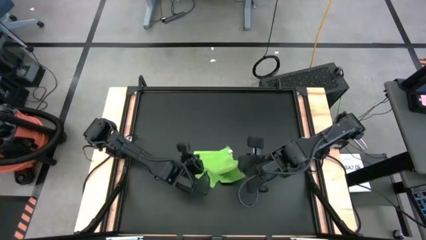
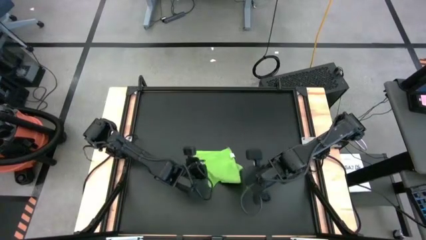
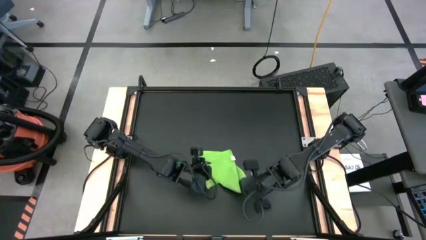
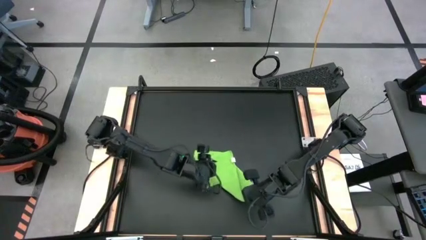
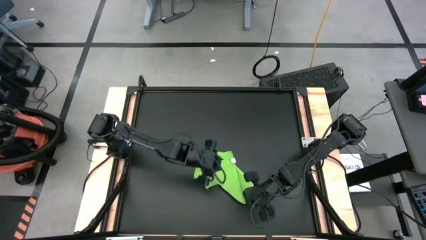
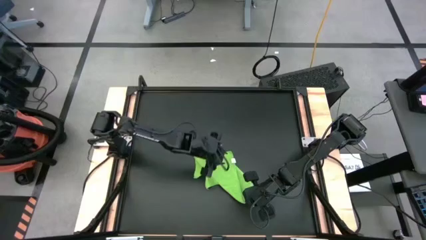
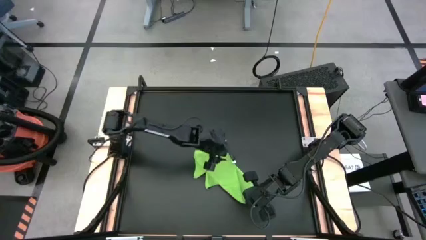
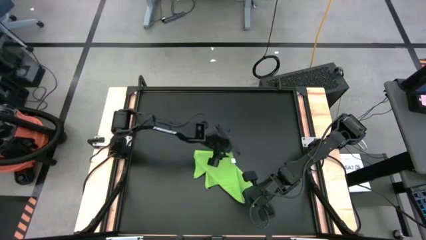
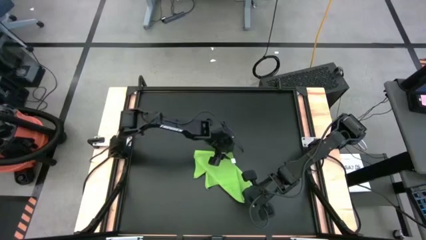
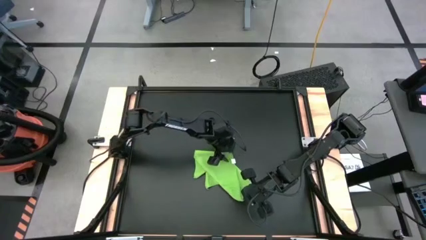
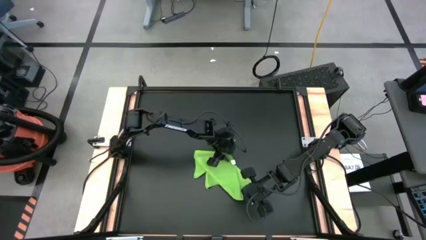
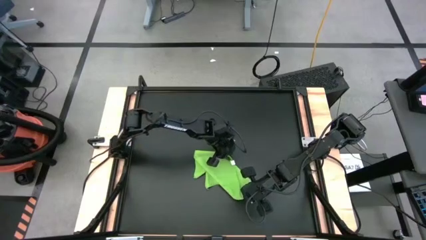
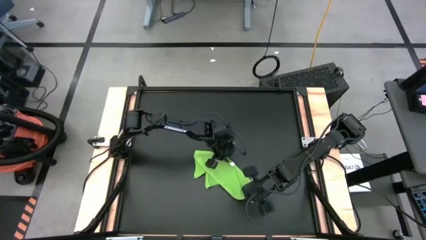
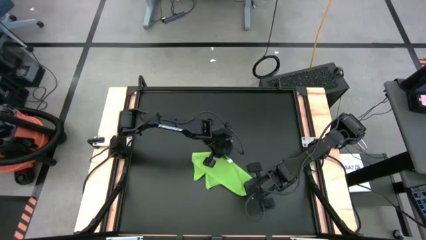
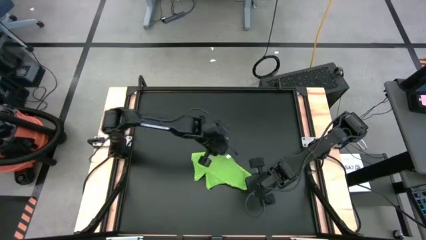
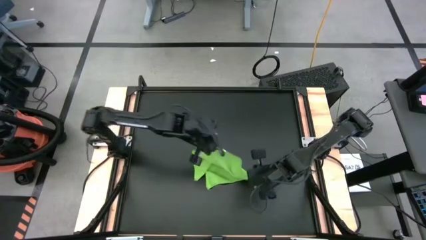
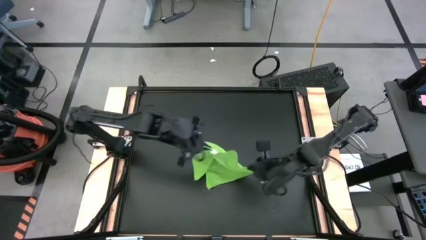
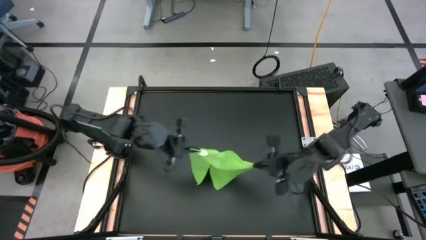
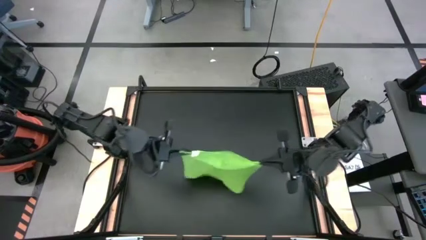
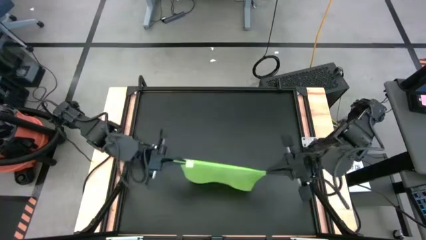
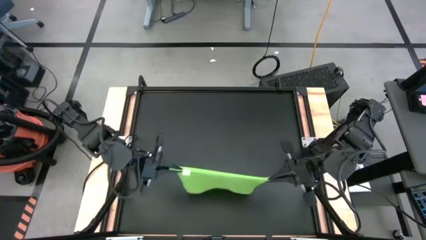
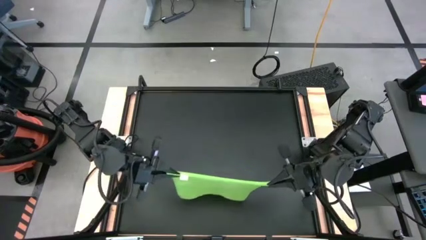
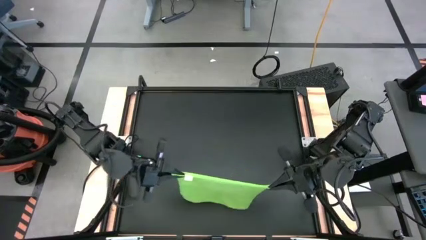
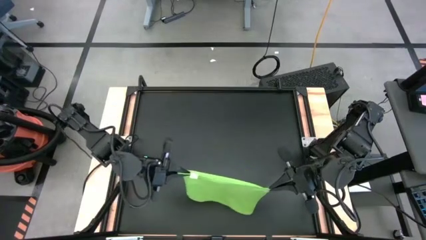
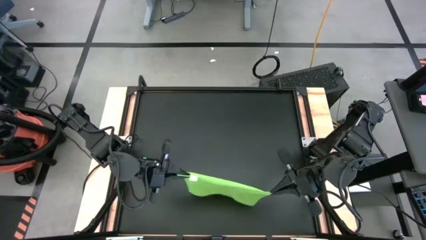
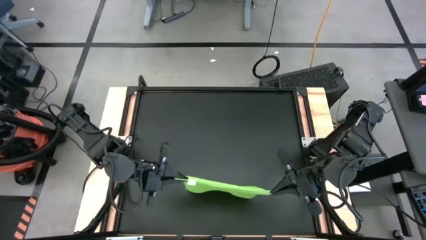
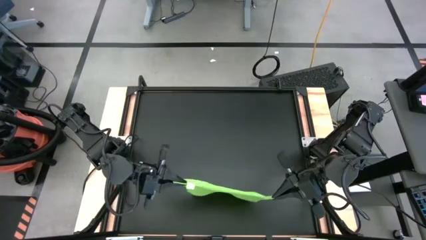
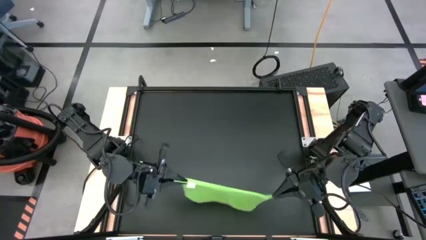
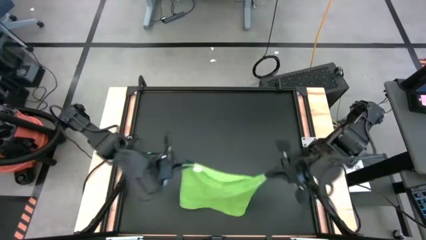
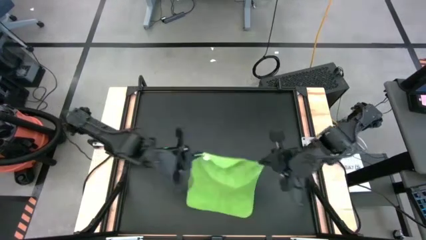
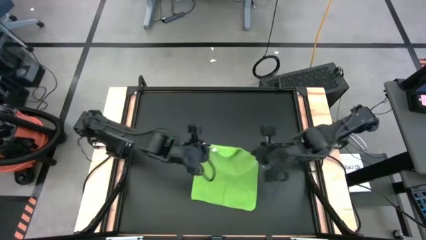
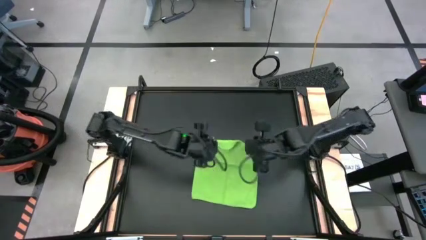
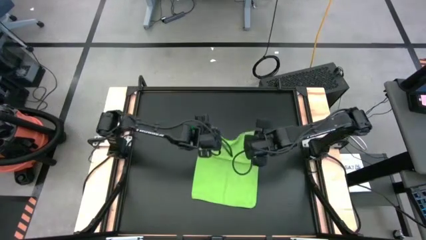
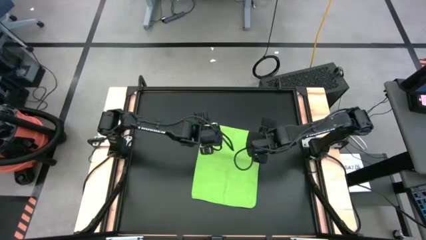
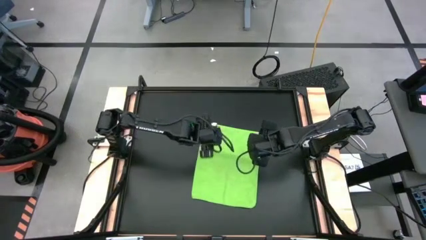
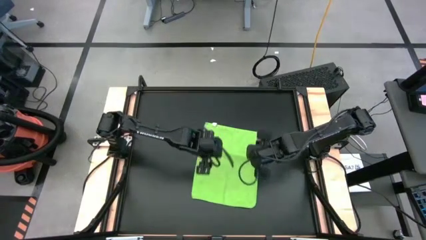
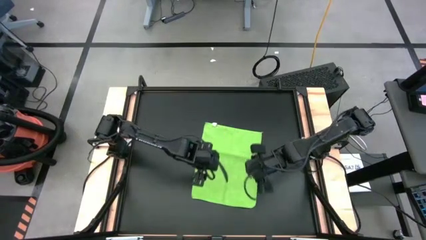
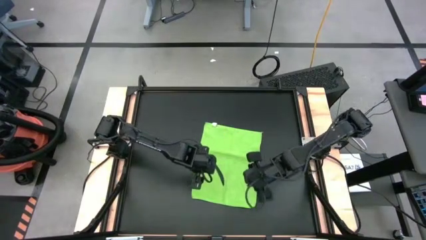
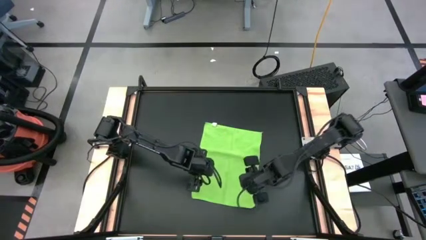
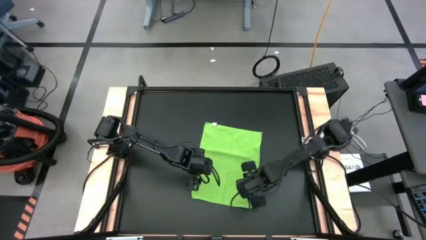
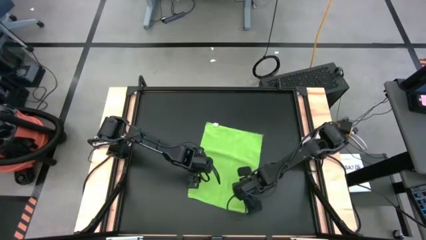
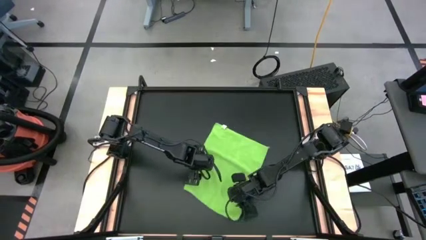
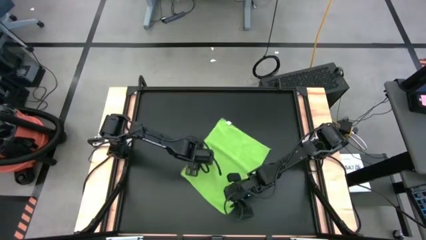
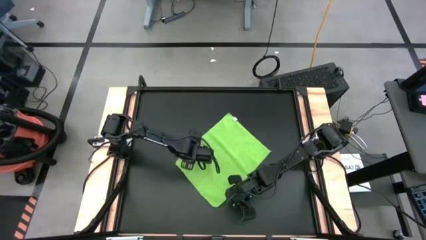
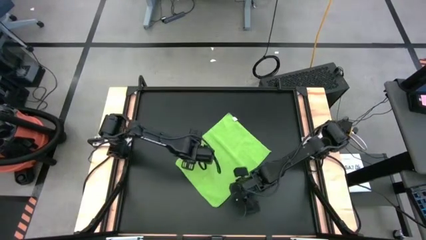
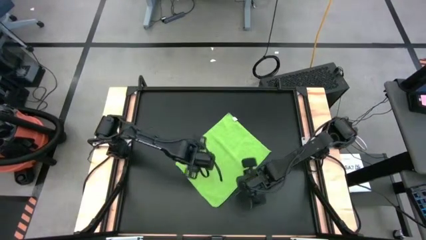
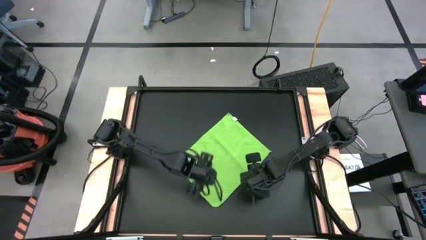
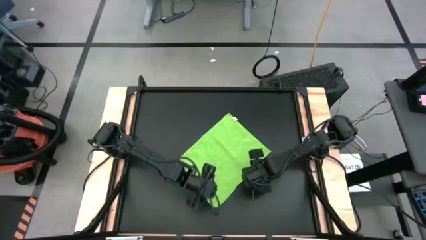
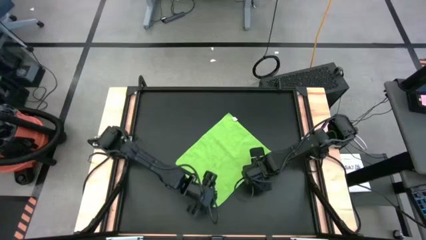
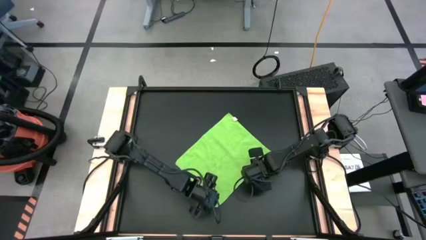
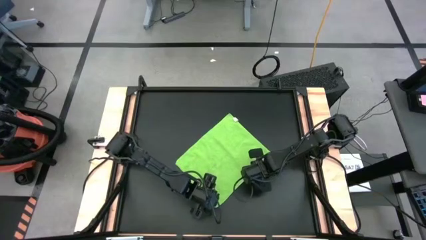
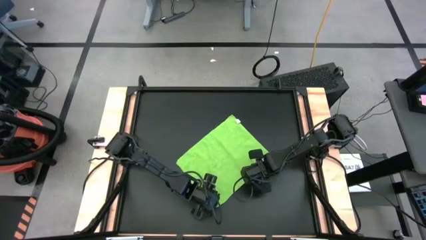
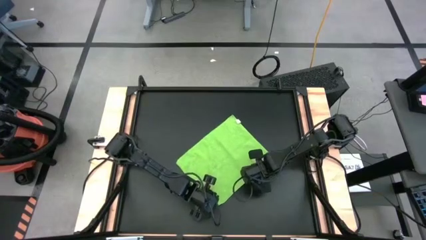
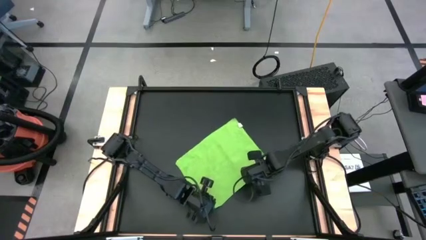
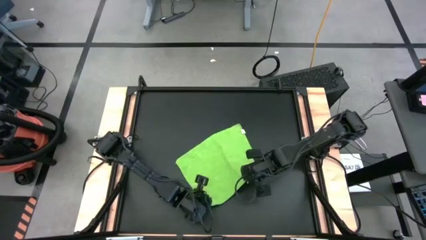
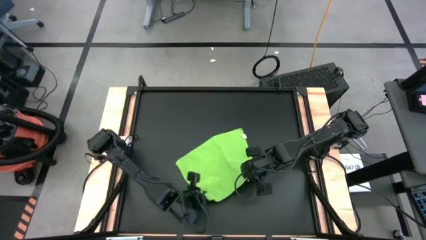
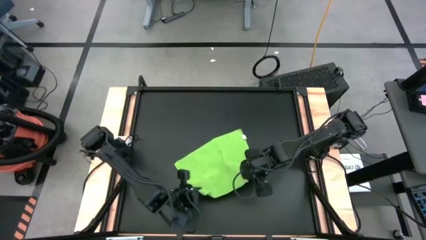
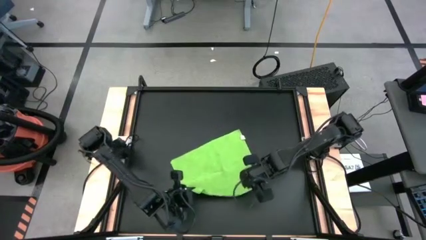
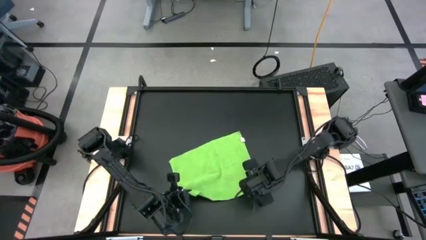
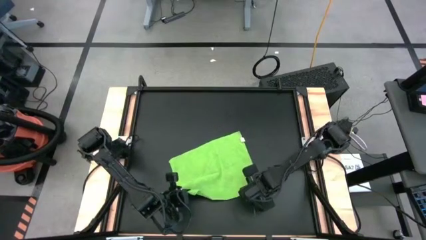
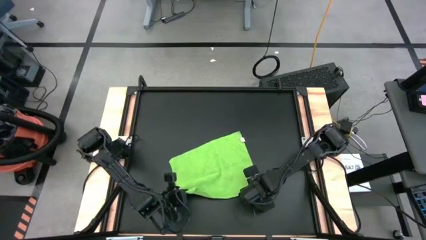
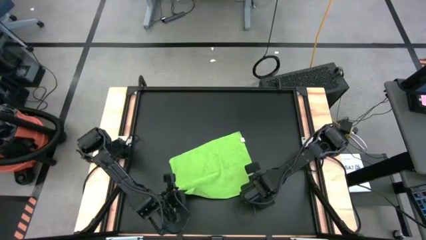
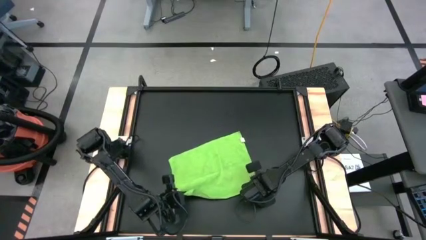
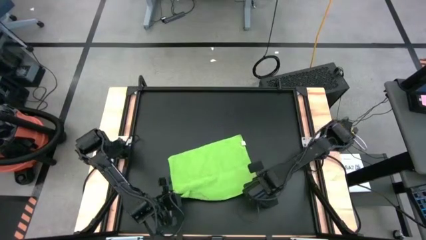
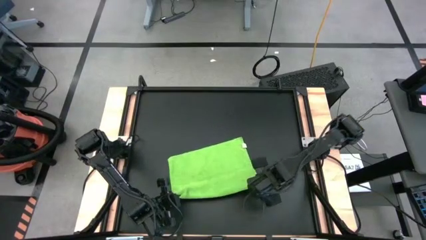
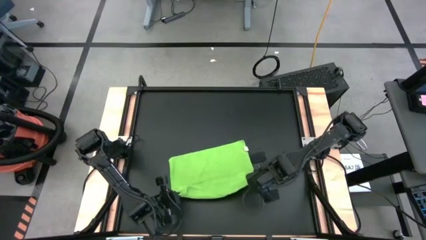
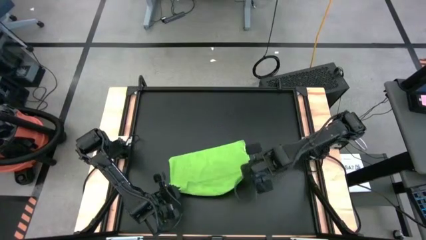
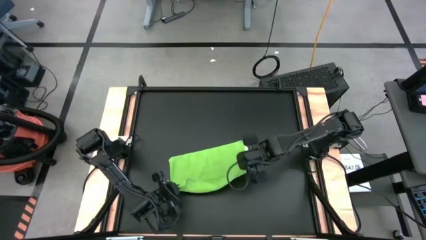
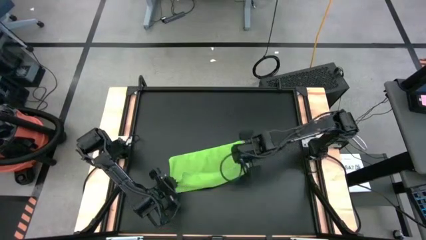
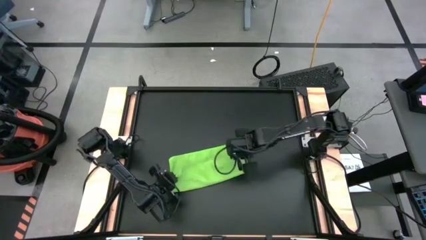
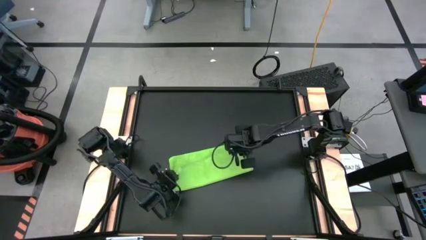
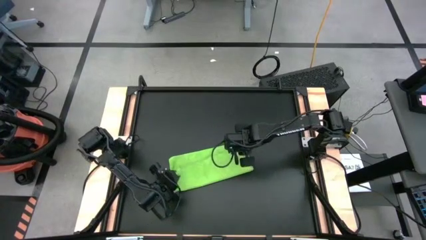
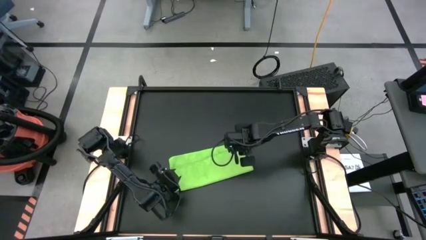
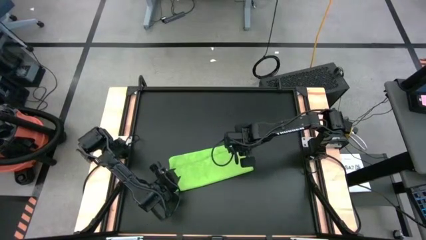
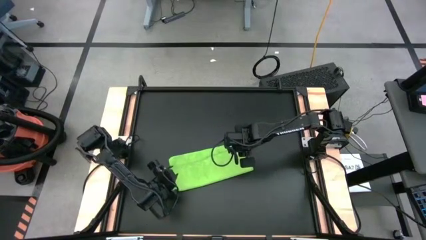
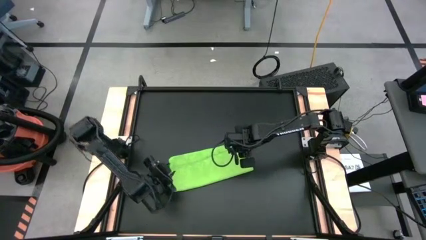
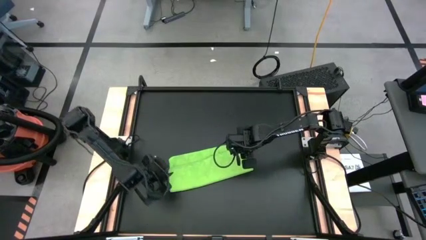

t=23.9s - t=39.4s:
Task: Roll towel into tight, uniform cylinder
Fold the green towel
